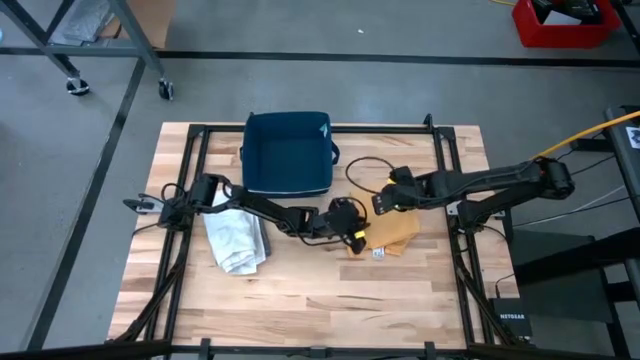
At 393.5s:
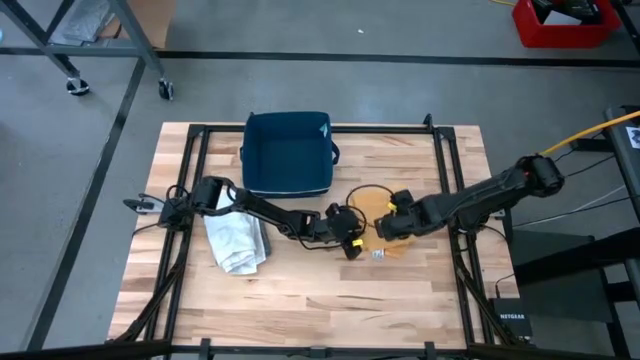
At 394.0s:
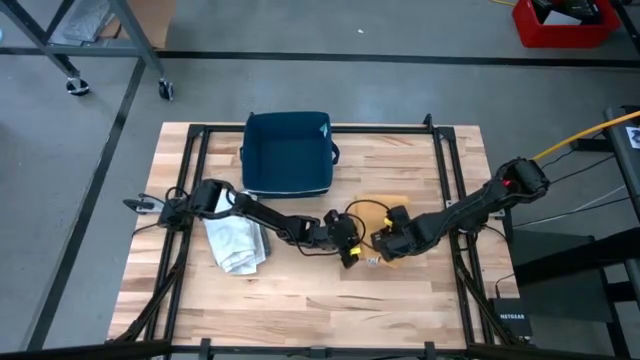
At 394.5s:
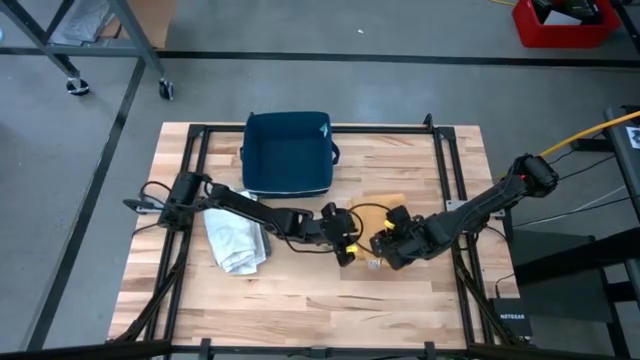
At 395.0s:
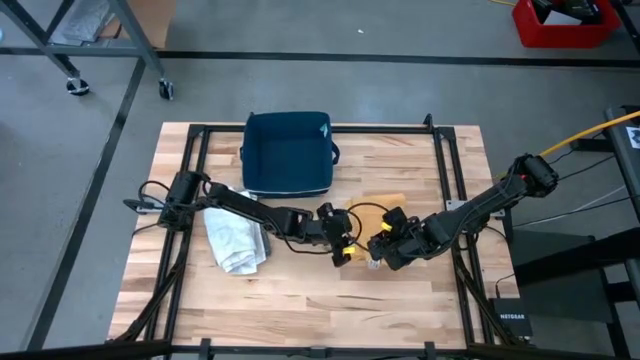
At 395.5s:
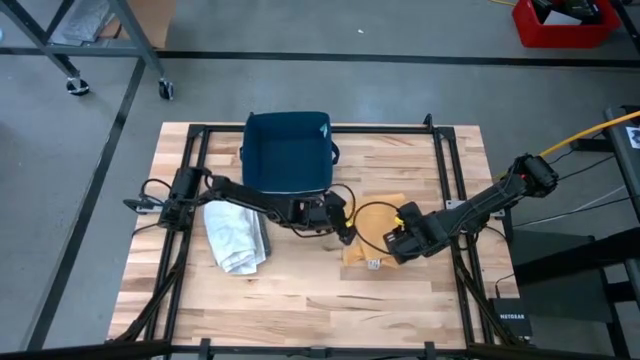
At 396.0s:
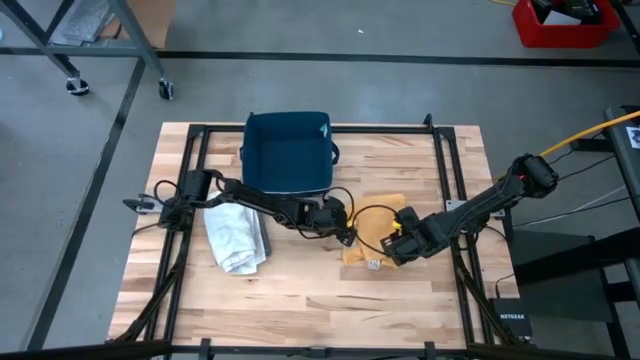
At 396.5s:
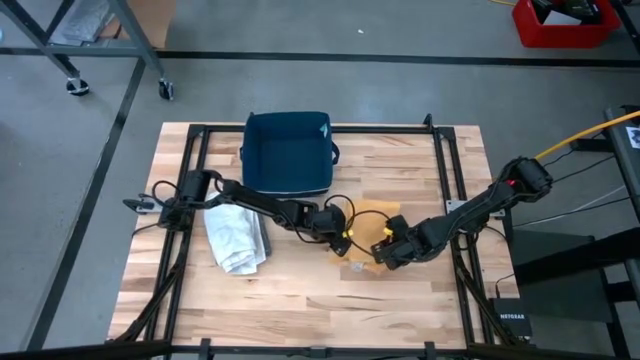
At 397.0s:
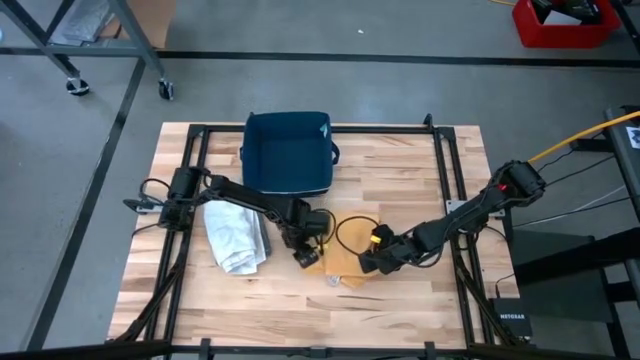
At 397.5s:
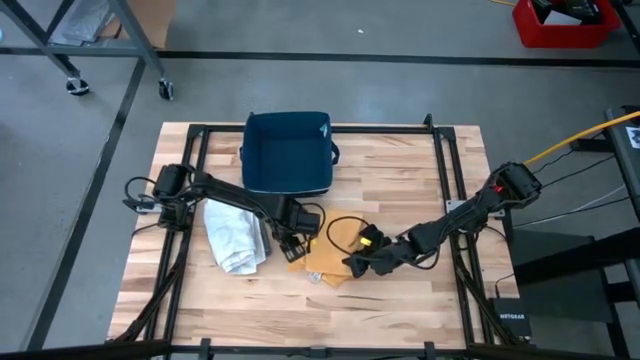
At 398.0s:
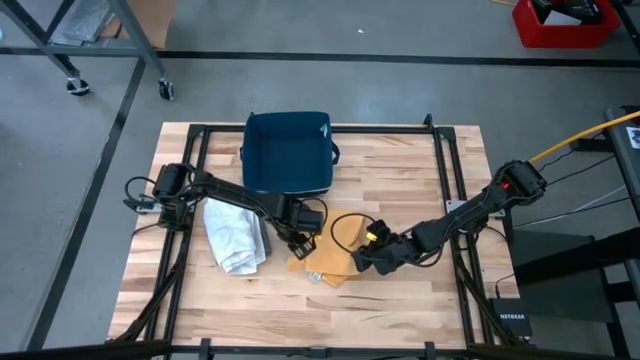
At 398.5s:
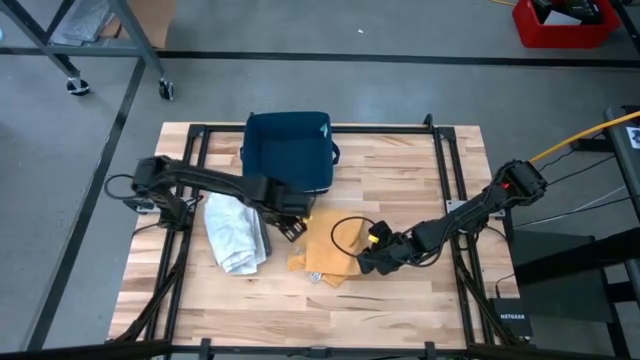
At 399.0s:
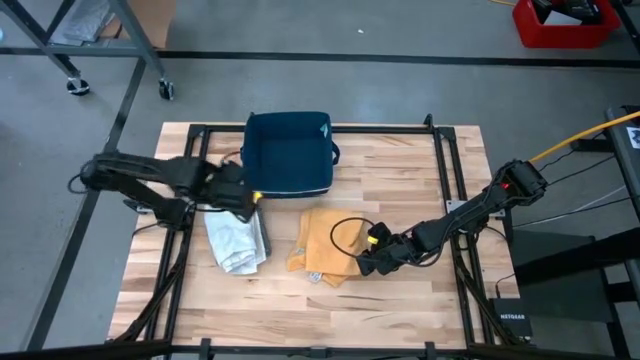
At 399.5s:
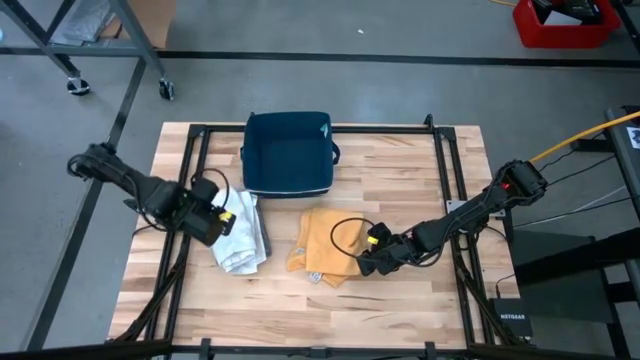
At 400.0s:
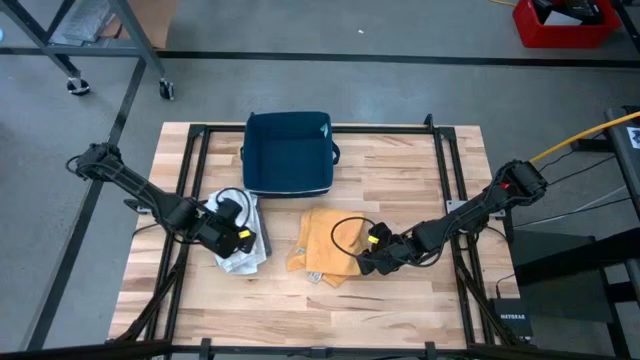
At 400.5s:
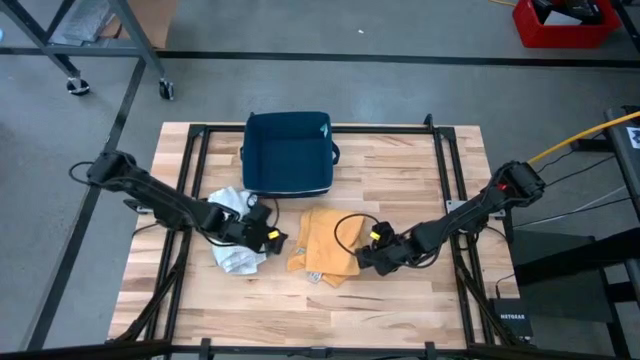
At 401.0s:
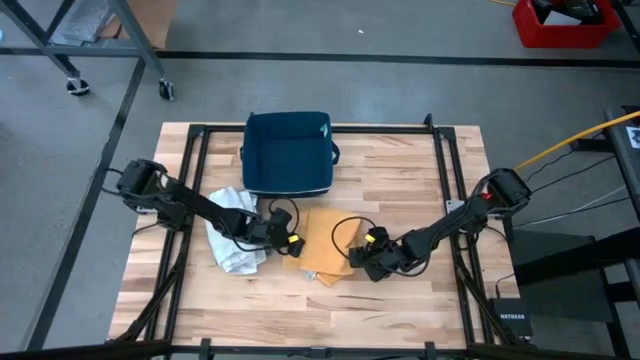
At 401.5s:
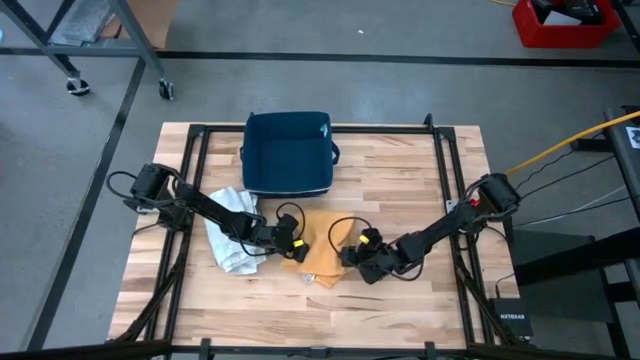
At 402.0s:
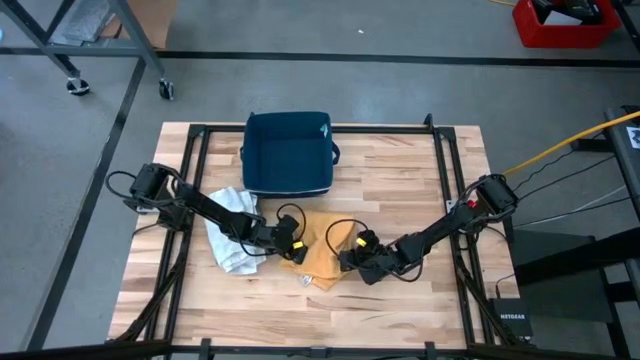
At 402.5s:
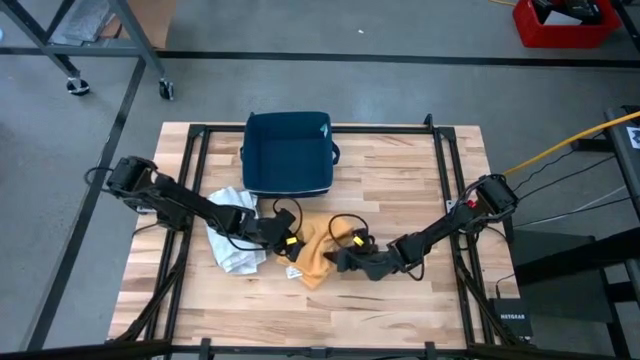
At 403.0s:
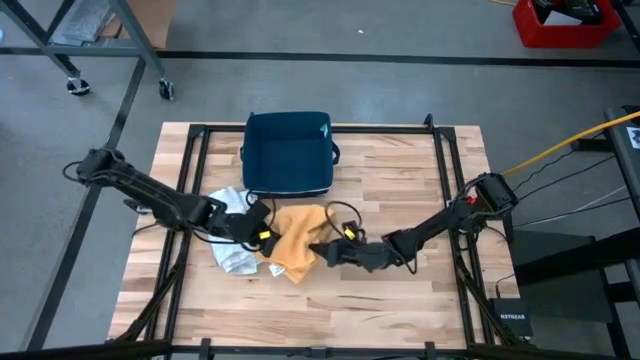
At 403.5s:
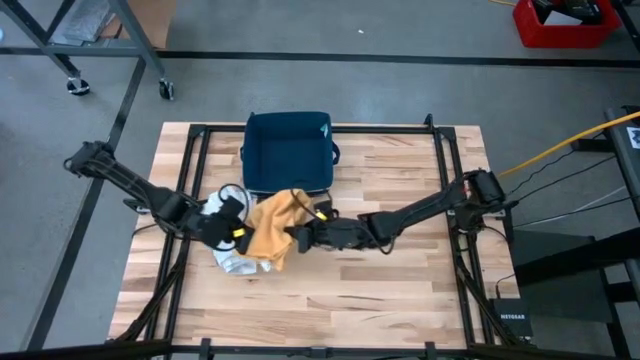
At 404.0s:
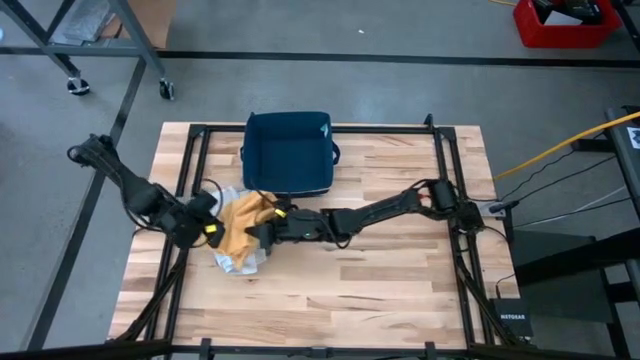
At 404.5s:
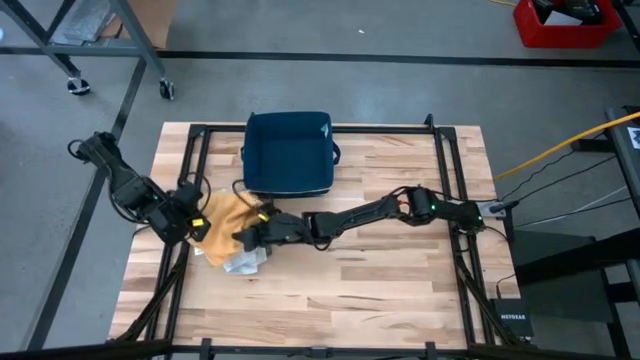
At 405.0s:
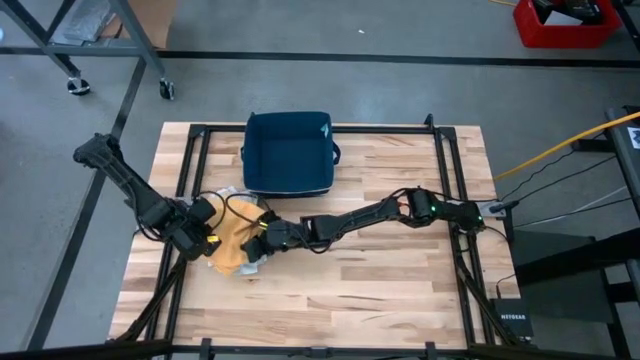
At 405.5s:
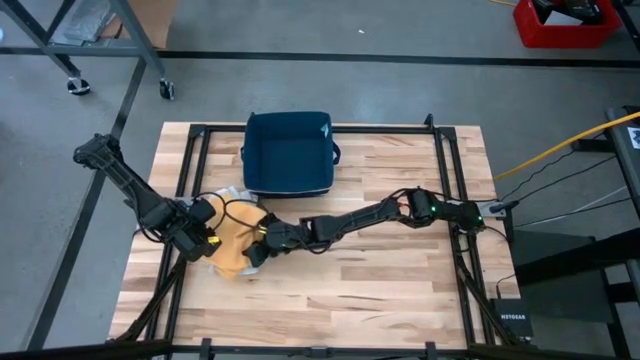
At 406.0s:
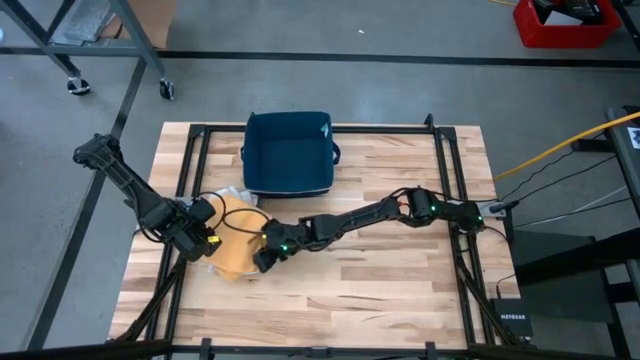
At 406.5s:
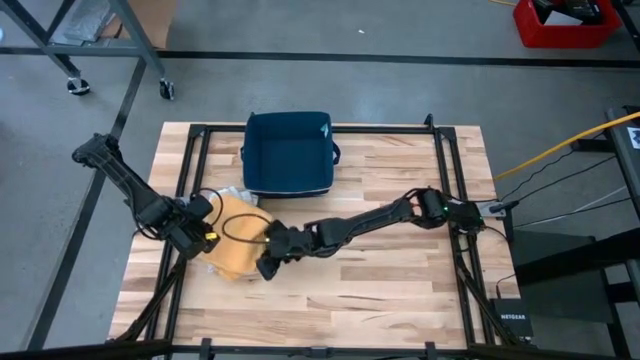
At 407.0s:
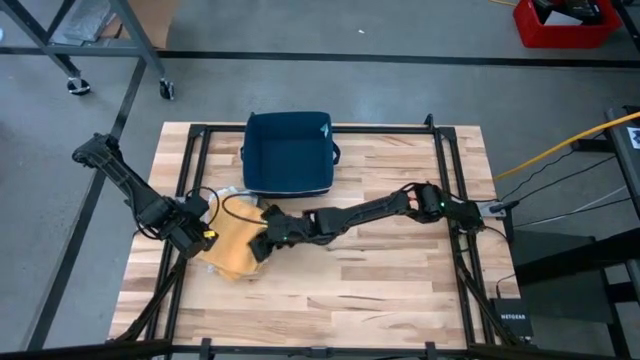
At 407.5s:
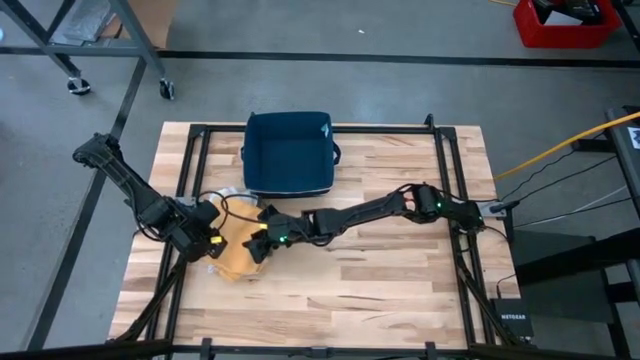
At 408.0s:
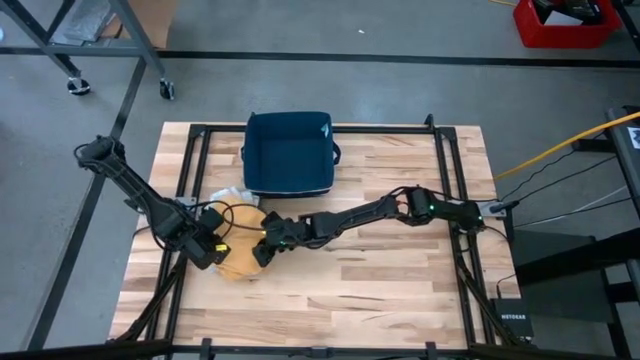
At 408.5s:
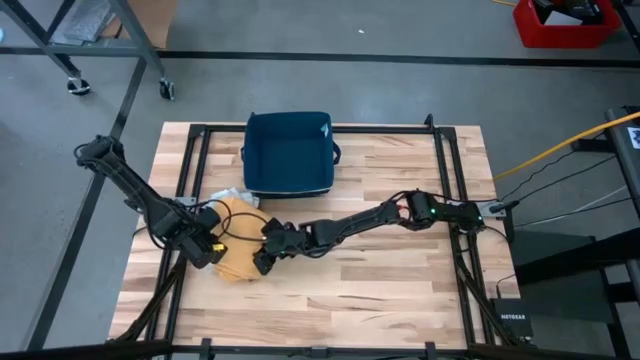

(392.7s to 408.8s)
Task: Fold towel
Stack the folded yellow towel on top of the folded white patterned towel

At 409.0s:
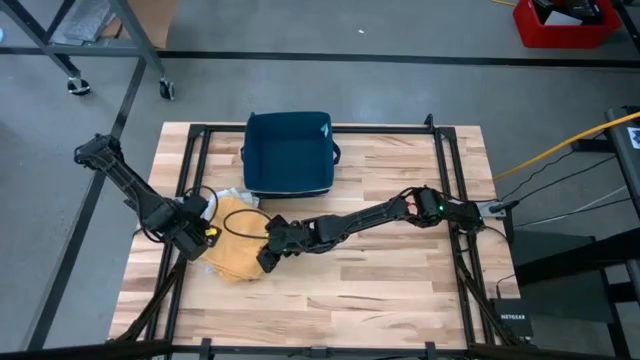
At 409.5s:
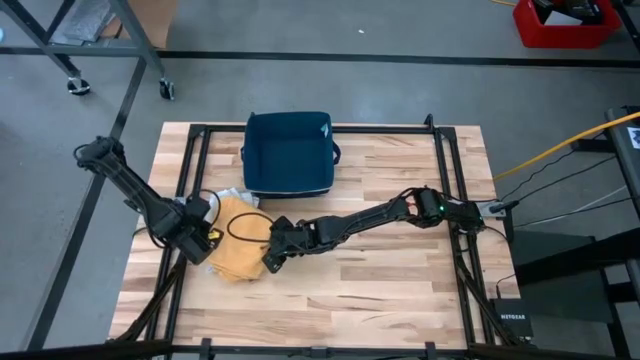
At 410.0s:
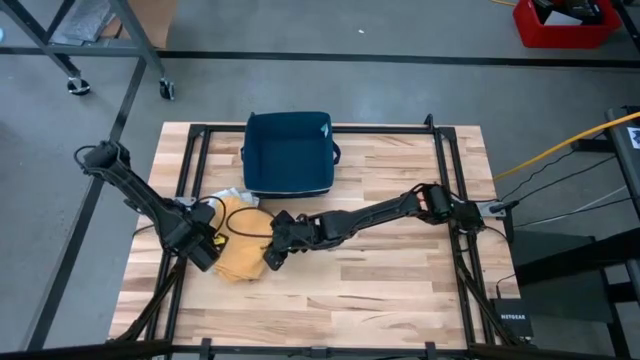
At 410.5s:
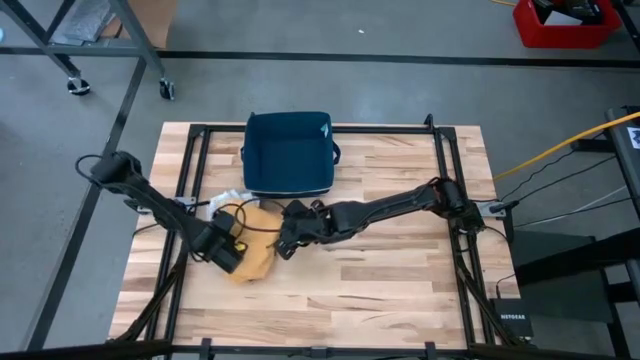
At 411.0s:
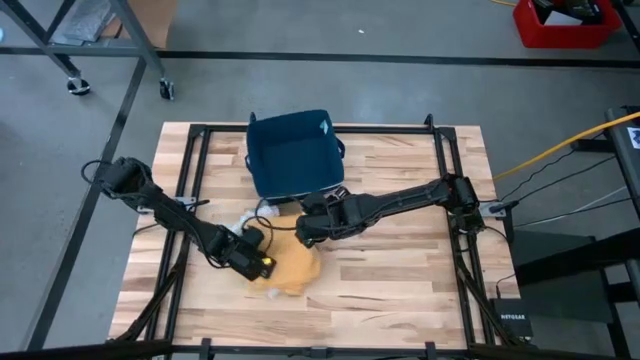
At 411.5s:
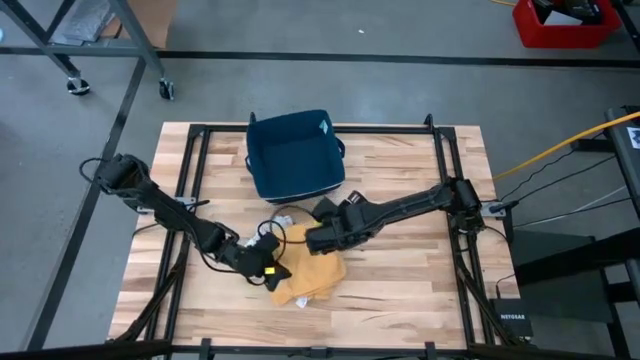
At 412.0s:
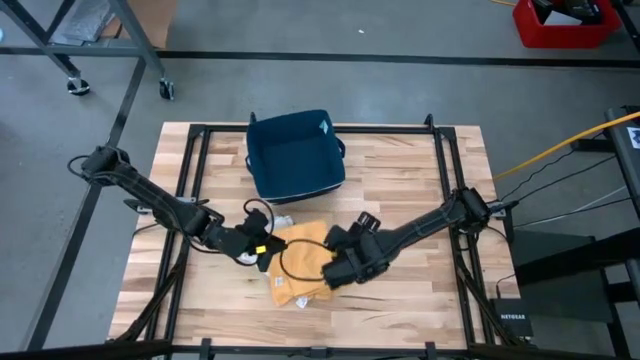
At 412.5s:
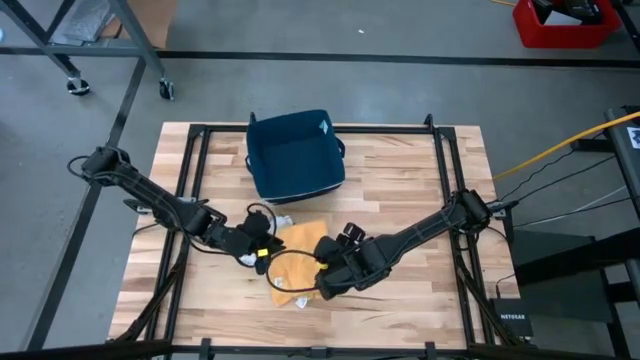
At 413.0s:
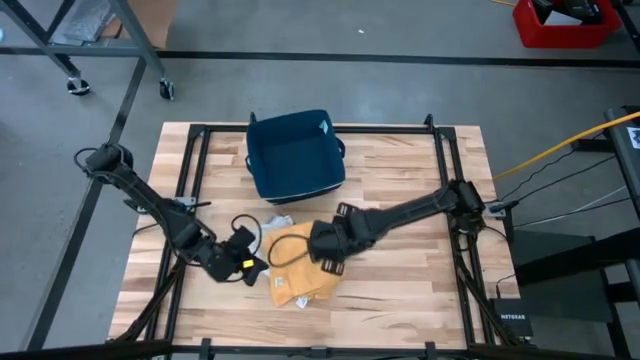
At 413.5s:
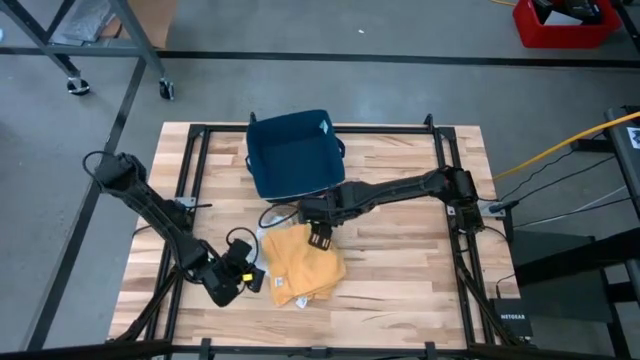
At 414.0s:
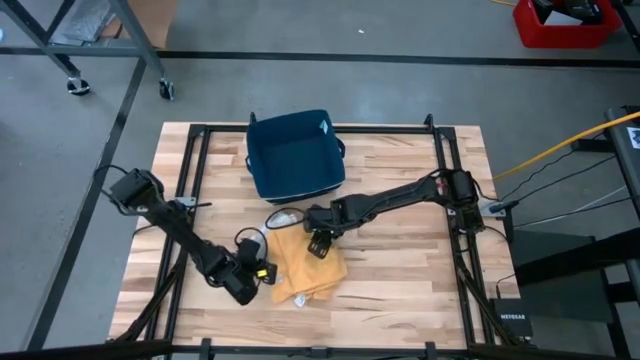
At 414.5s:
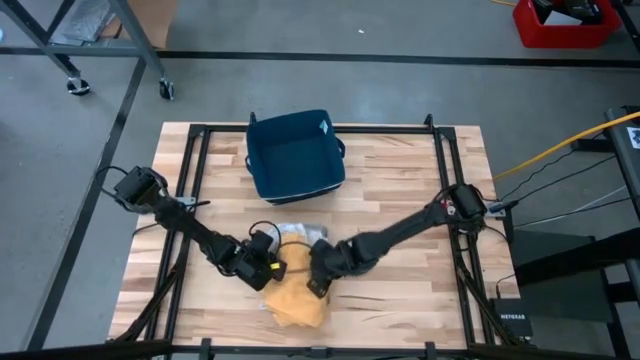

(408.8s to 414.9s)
Move the stacked folded colored towels to the center
